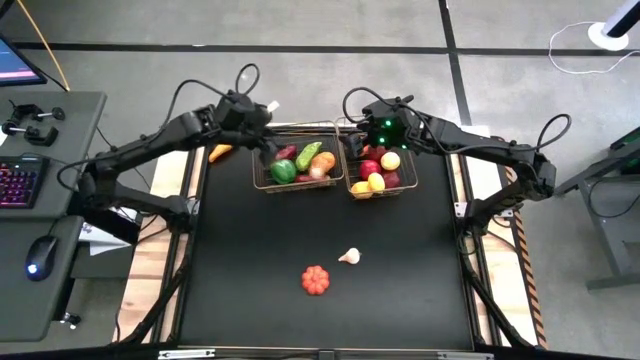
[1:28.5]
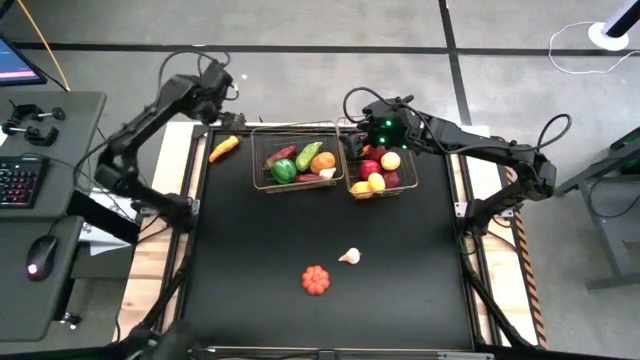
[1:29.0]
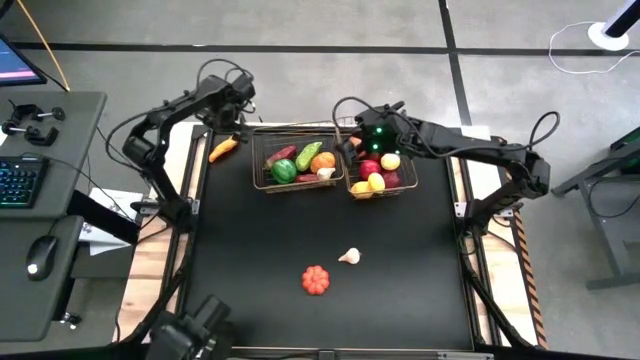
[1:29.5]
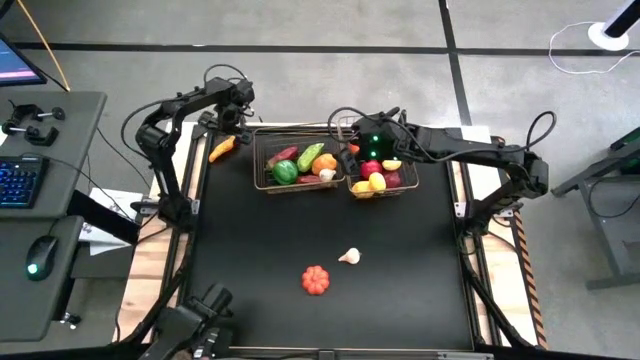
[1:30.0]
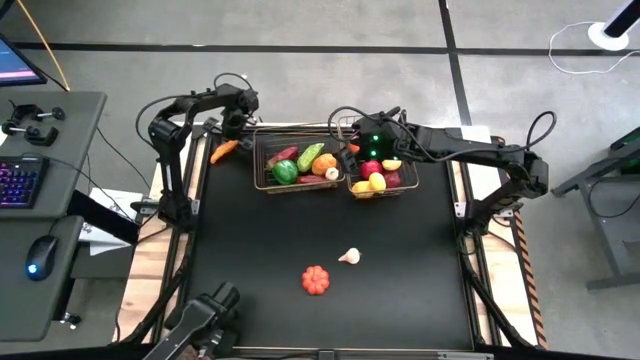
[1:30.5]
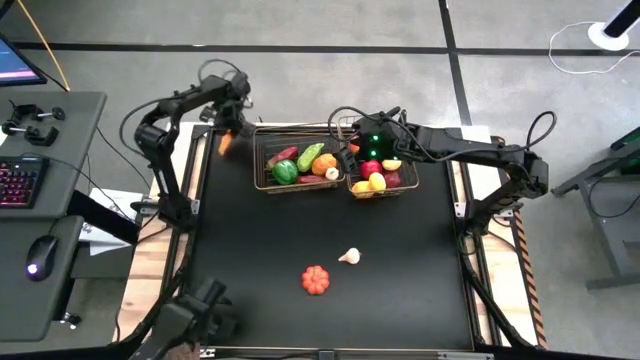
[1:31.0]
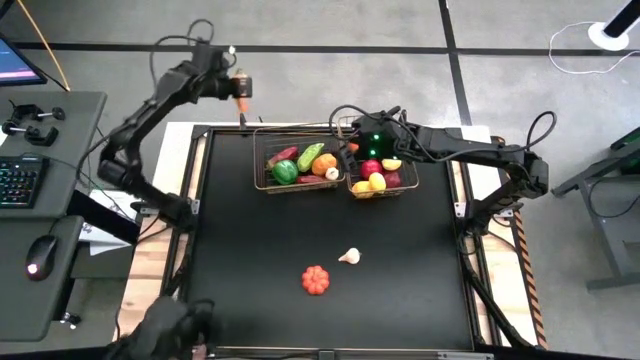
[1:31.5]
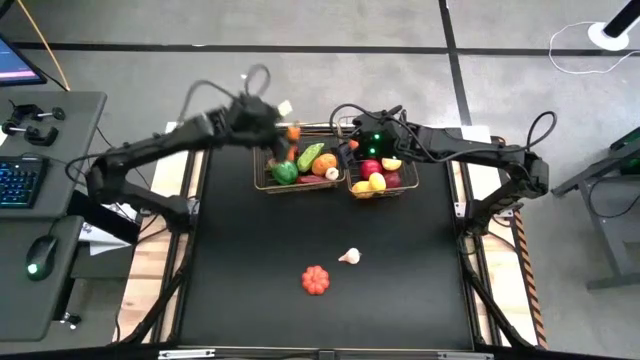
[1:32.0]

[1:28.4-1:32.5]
Task: Sort produce into baskets
Put the yellow chili pepper into the left wire basket

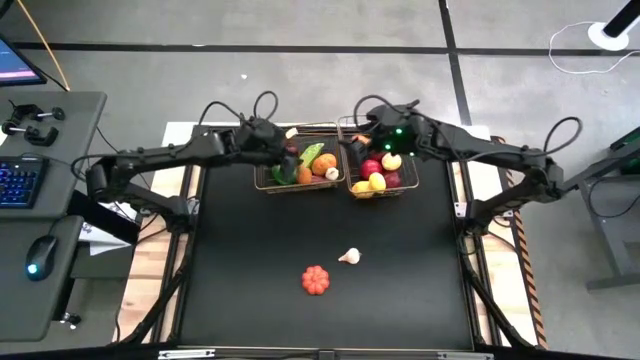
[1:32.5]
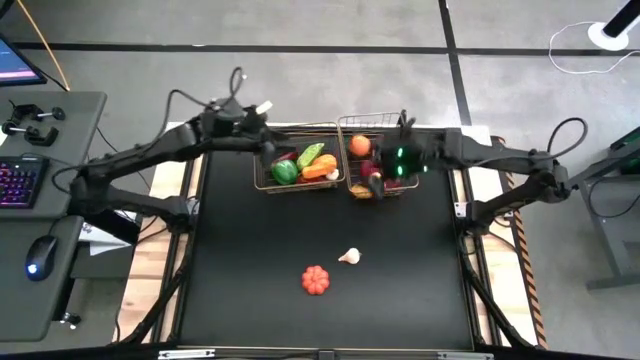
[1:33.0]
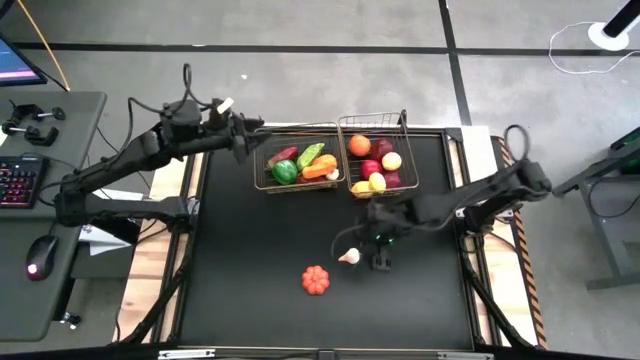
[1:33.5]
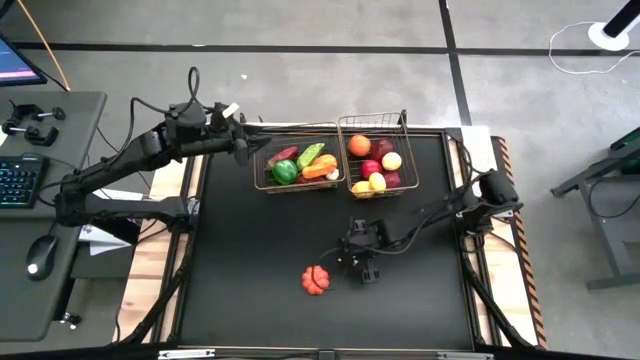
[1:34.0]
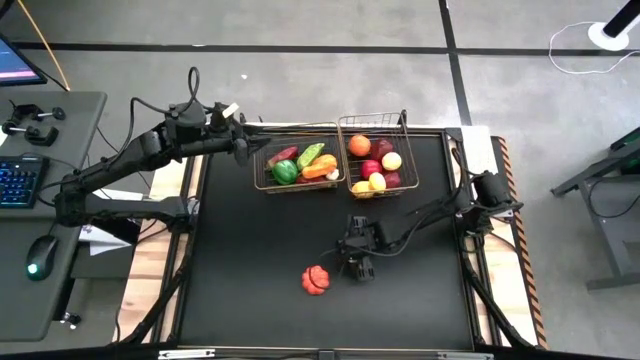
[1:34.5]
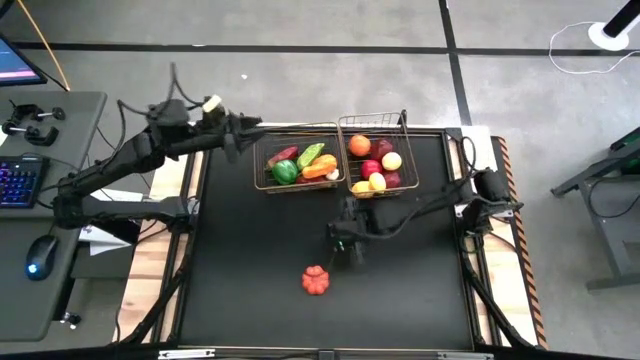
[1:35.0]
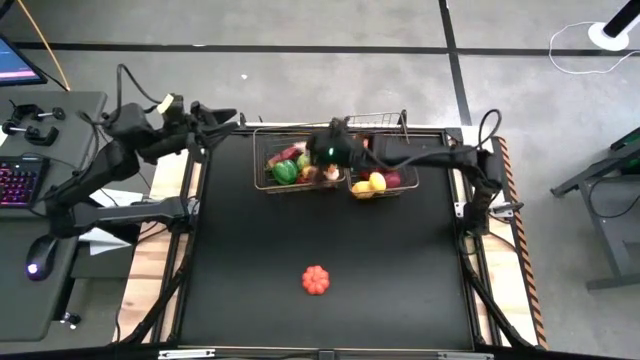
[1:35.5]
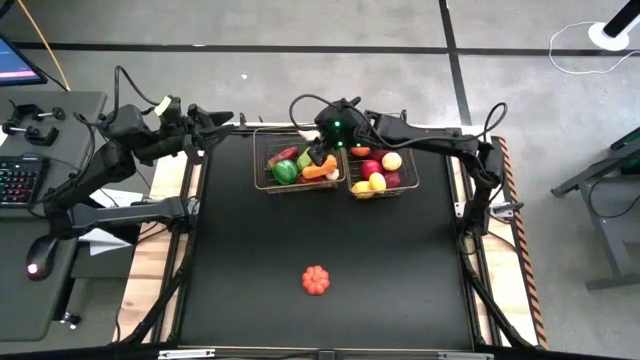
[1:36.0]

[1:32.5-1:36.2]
Put the white garlic into the left wire basket

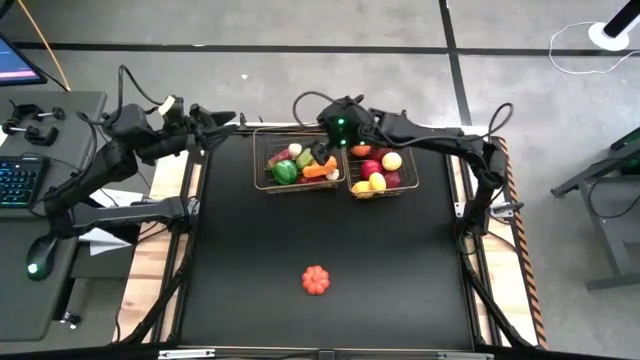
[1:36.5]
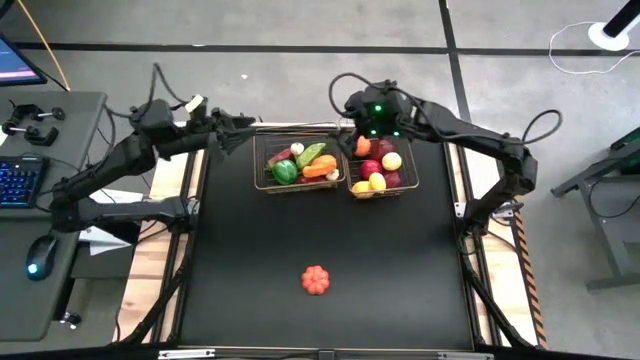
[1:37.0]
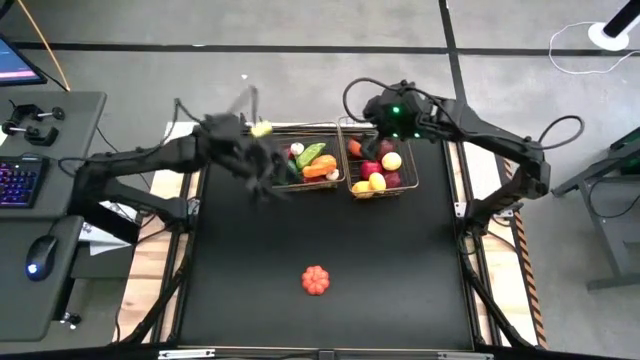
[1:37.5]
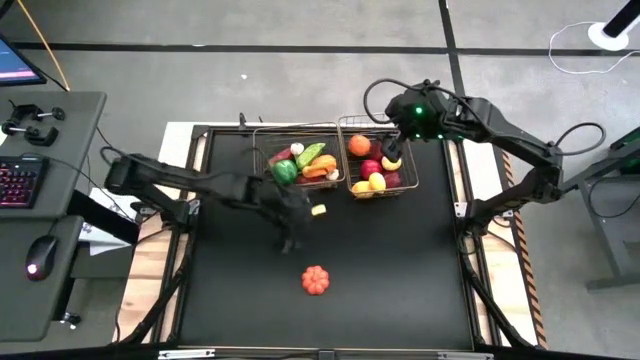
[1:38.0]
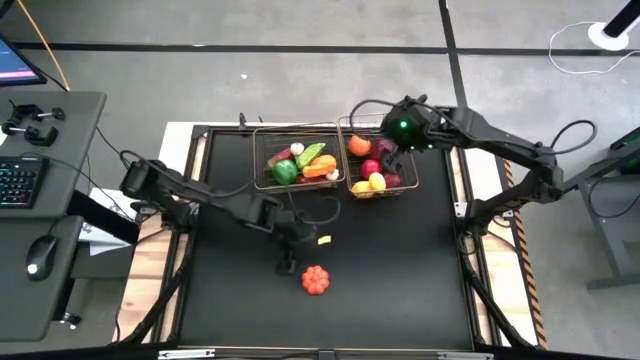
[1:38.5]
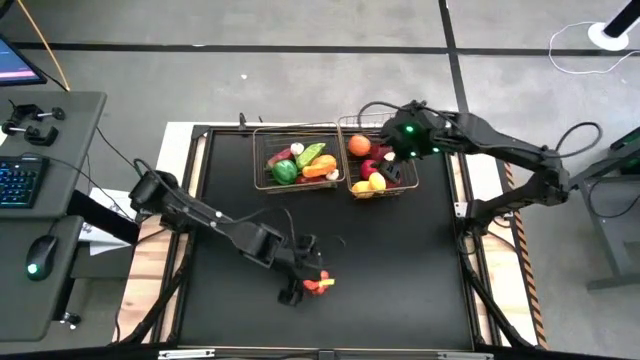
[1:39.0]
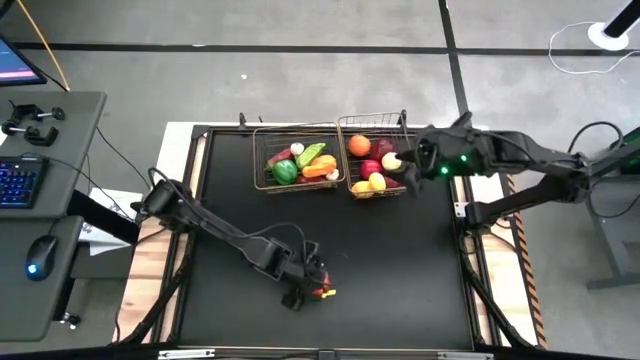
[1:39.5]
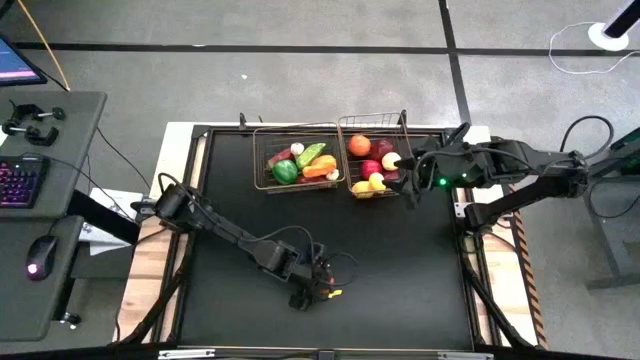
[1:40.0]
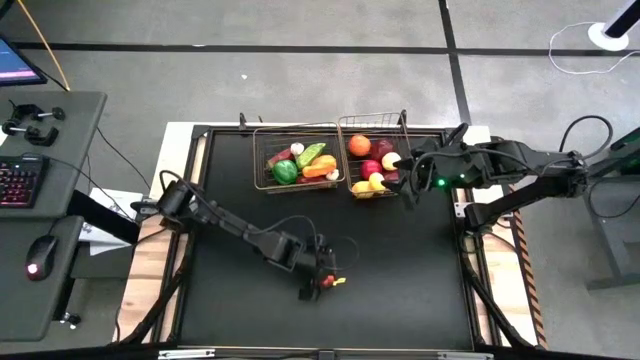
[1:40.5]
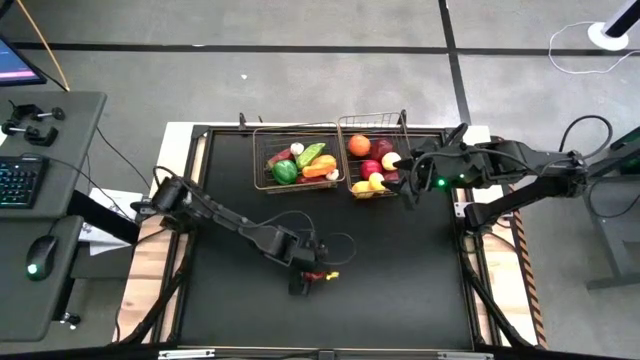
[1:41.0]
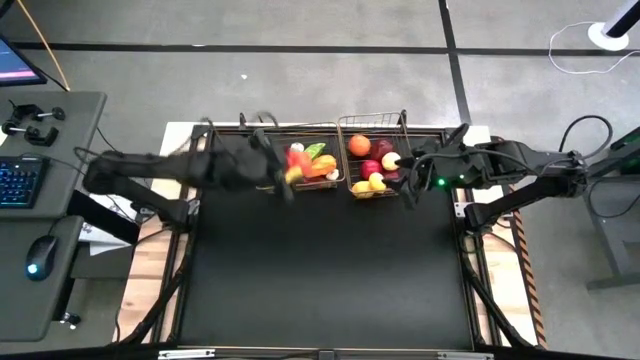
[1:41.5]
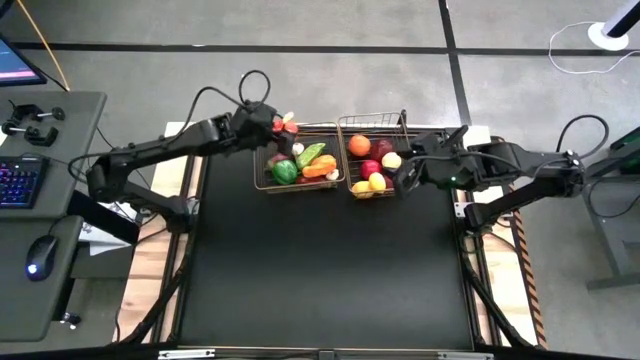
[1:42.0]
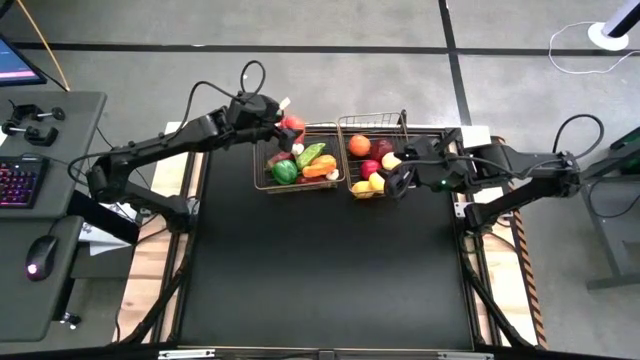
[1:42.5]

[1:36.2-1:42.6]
Put the orange pumpkin into the left wire basket

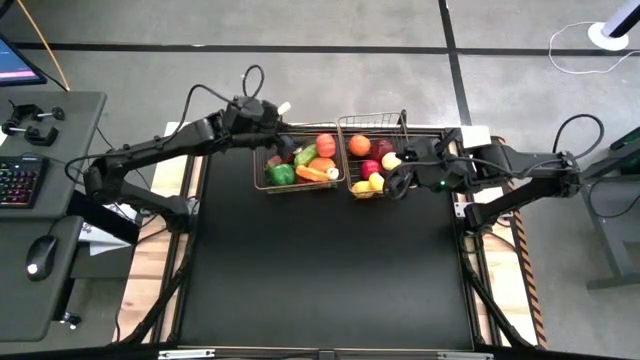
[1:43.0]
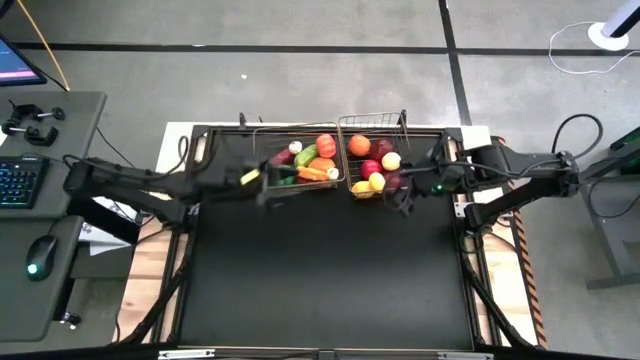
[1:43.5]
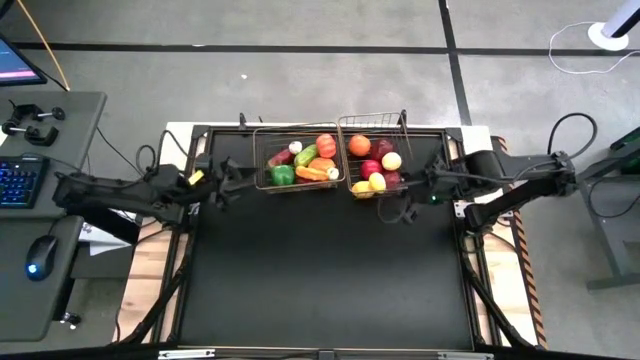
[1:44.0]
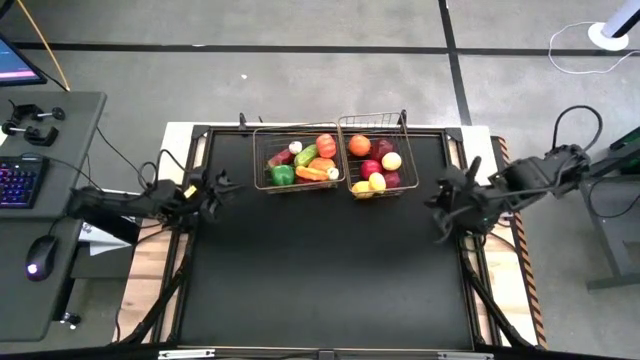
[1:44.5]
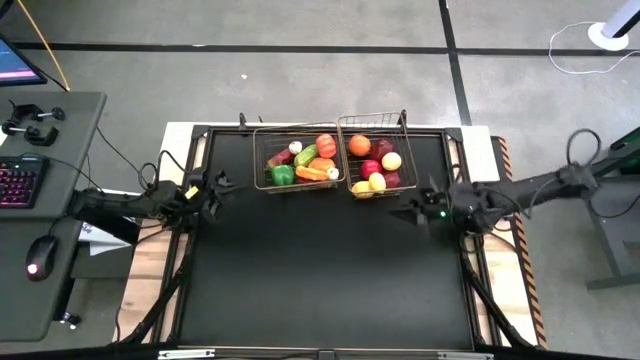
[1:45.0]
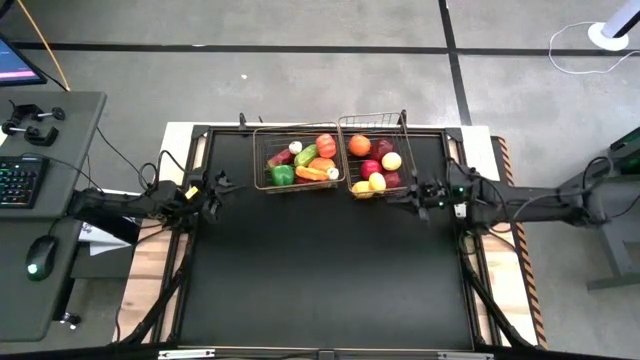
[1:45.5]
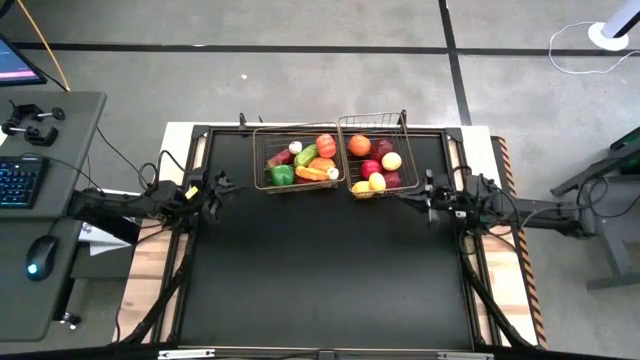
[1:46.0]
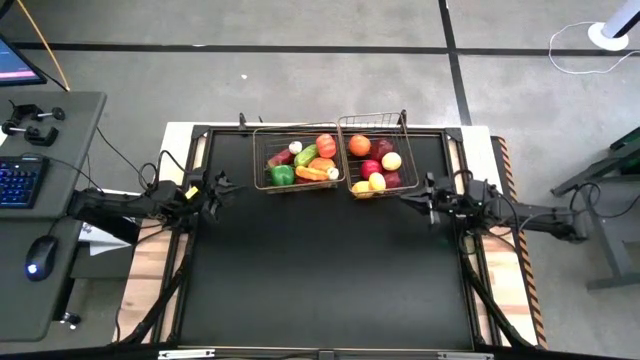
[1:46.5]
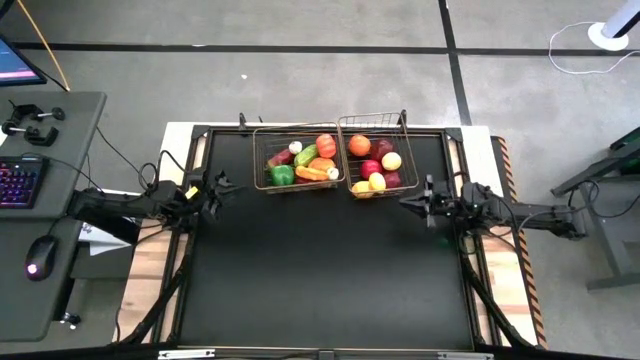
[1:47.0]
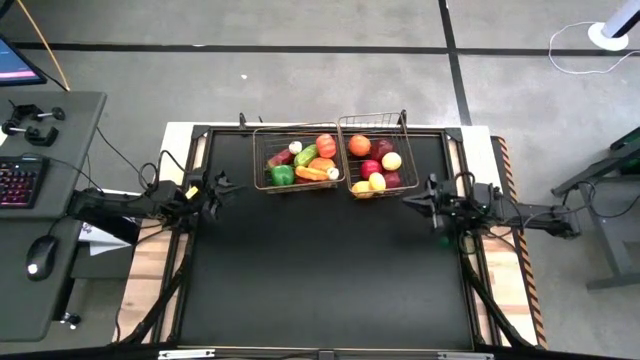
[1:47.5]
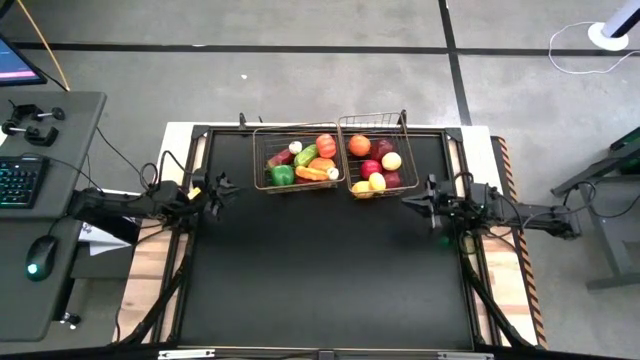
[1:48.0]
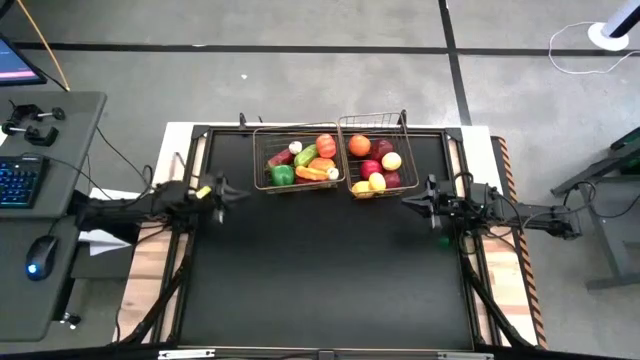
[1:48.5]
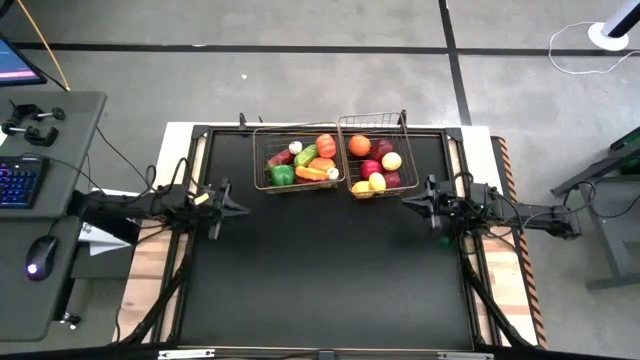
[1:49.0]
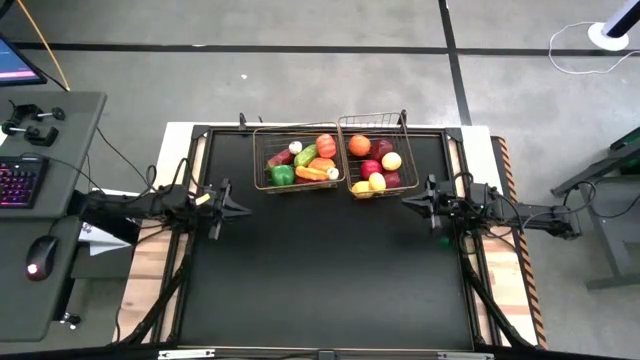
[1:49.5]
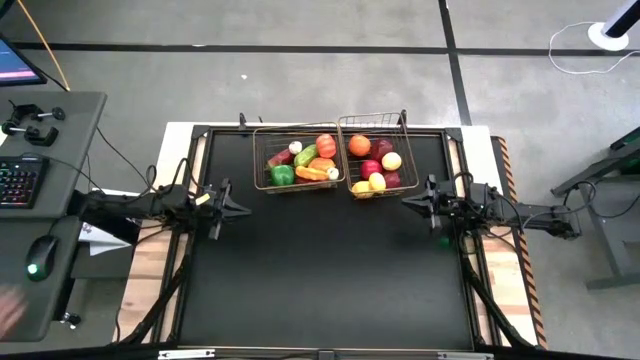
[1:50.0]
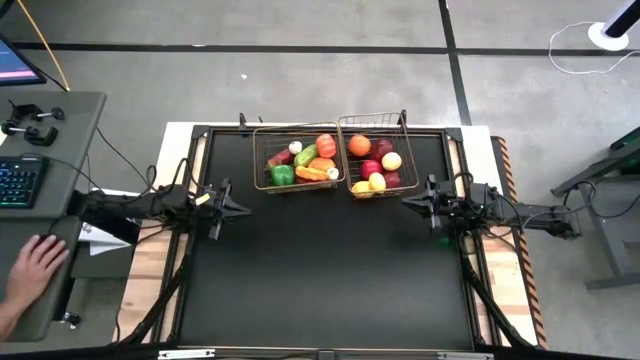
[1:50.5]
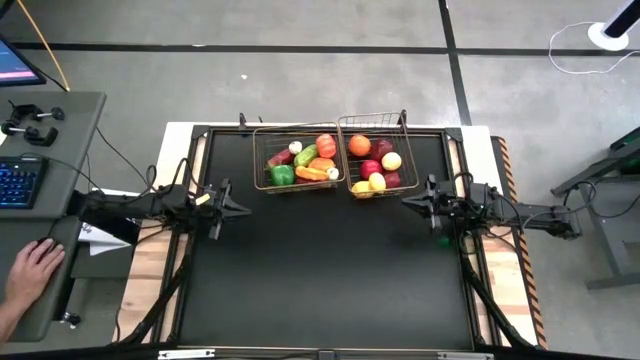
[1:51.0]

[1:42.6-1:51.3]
Return to Home Position
